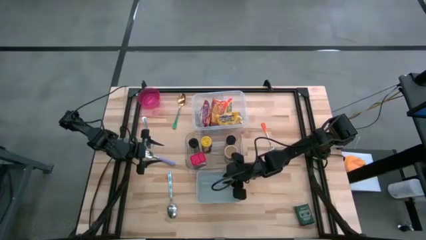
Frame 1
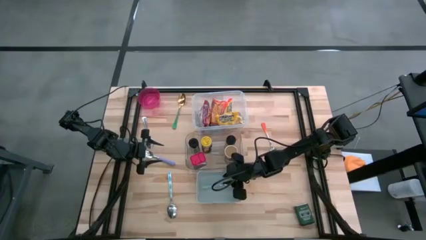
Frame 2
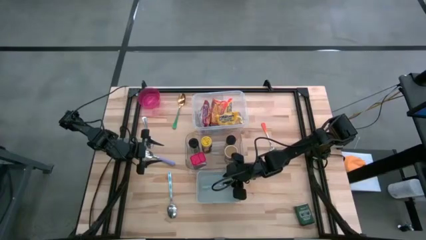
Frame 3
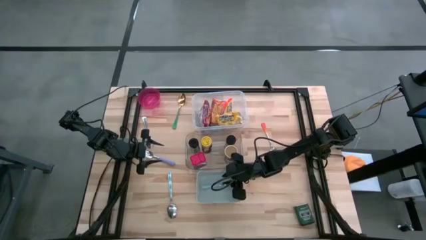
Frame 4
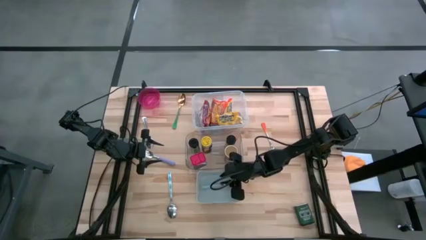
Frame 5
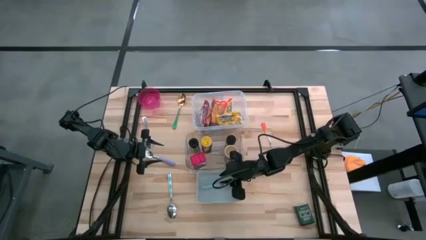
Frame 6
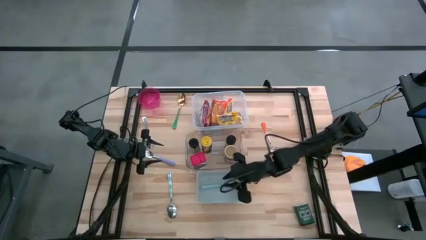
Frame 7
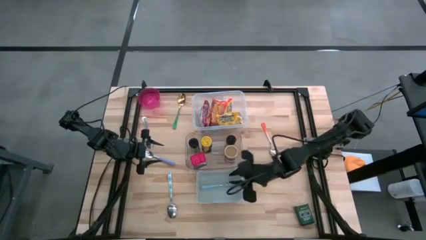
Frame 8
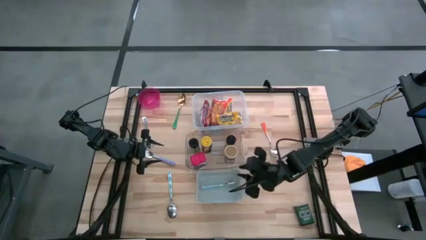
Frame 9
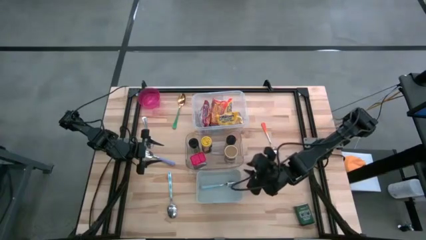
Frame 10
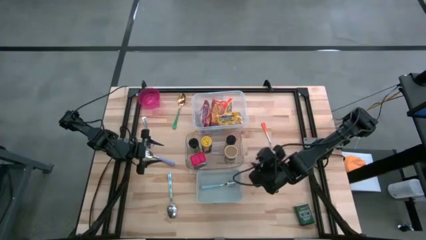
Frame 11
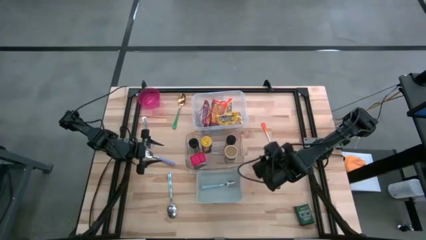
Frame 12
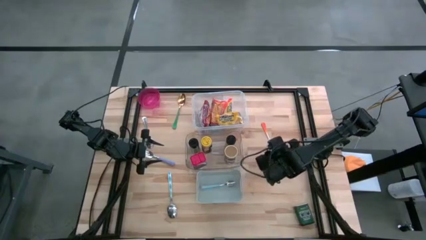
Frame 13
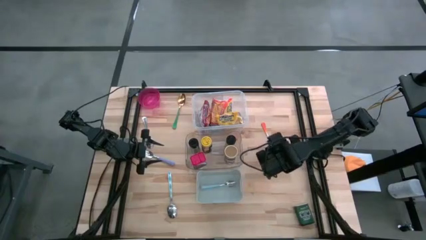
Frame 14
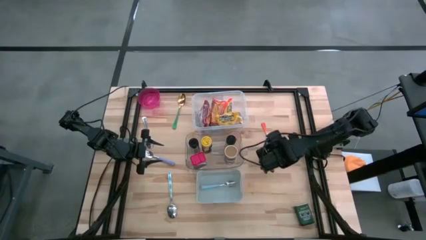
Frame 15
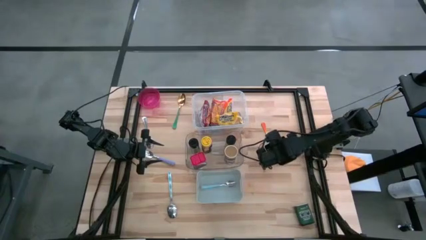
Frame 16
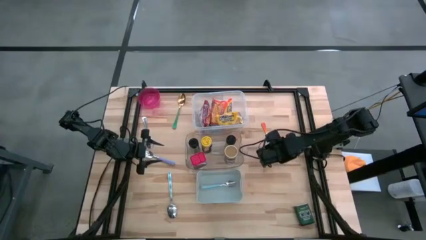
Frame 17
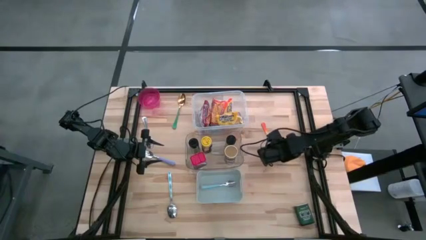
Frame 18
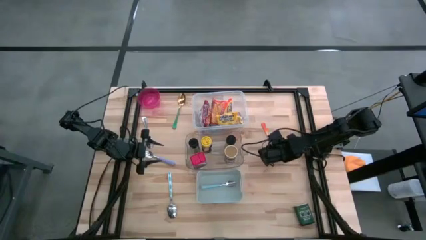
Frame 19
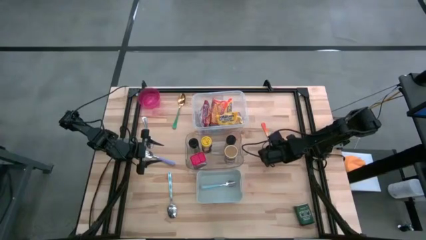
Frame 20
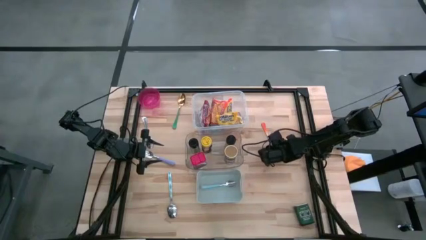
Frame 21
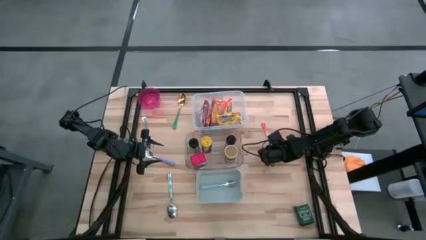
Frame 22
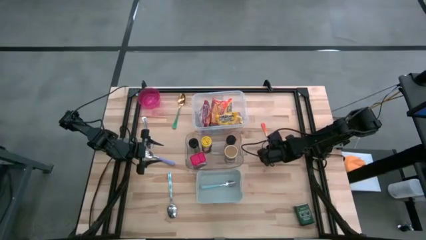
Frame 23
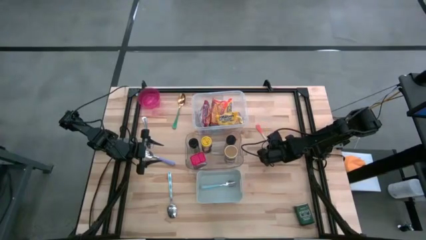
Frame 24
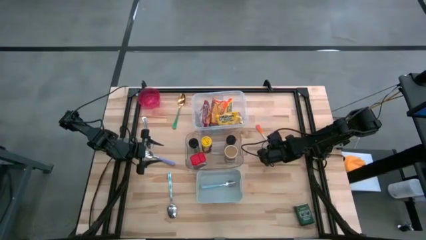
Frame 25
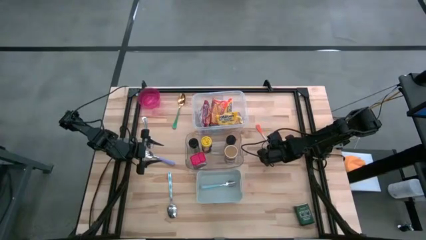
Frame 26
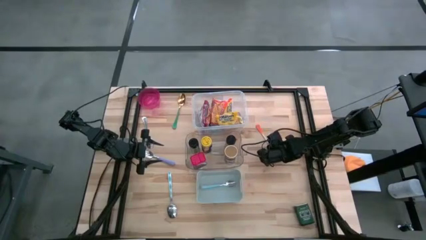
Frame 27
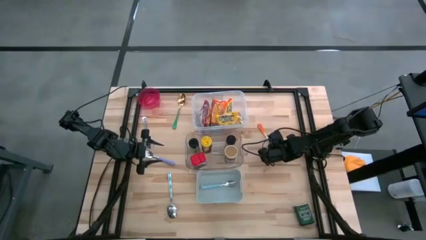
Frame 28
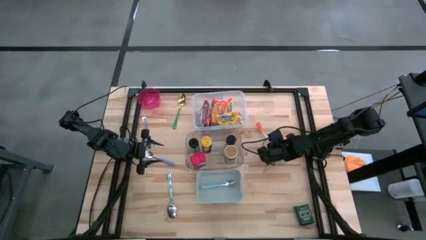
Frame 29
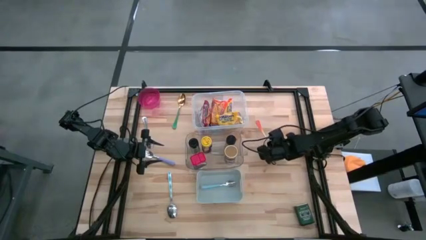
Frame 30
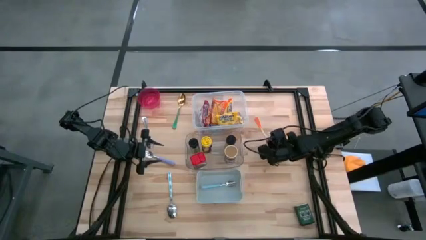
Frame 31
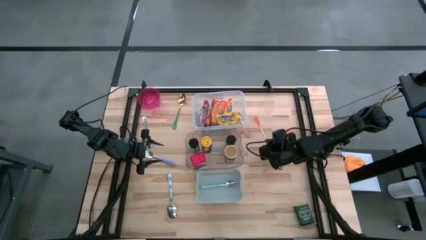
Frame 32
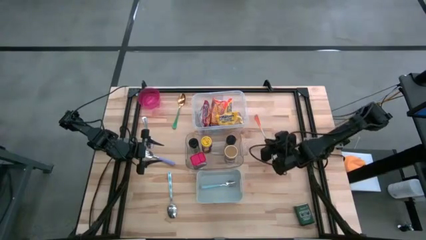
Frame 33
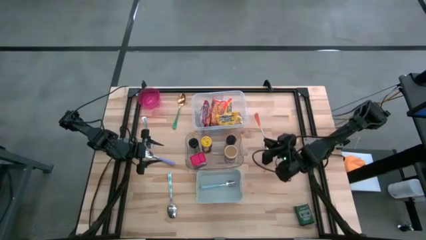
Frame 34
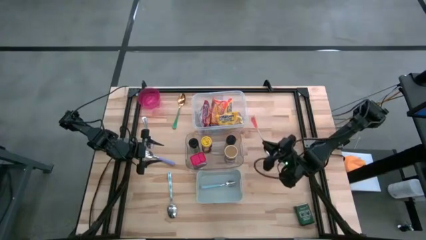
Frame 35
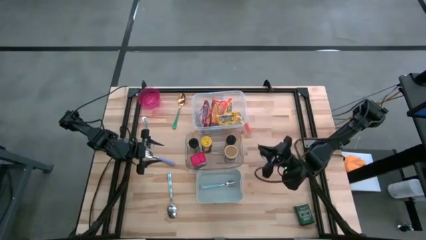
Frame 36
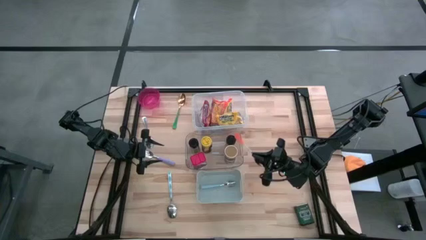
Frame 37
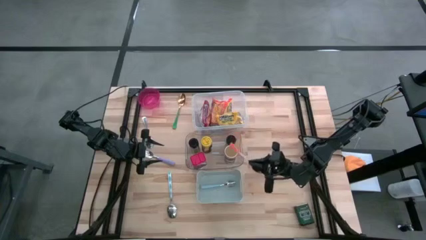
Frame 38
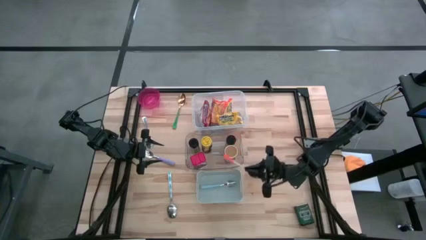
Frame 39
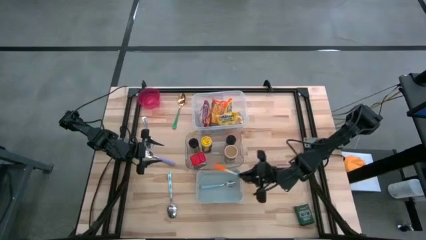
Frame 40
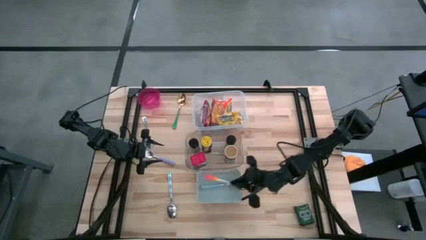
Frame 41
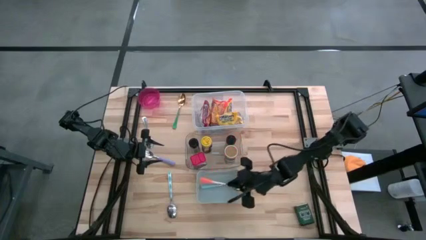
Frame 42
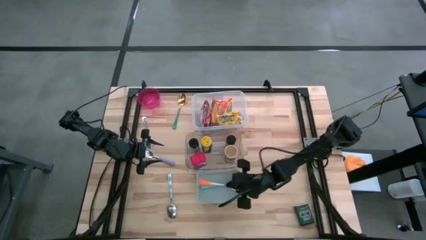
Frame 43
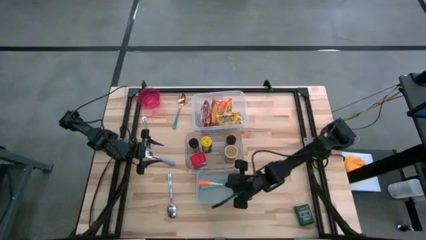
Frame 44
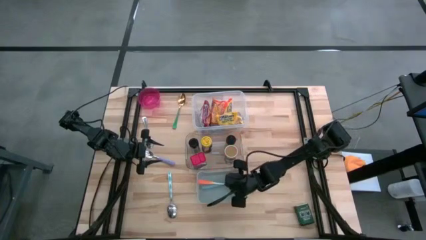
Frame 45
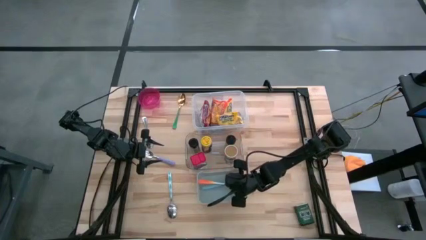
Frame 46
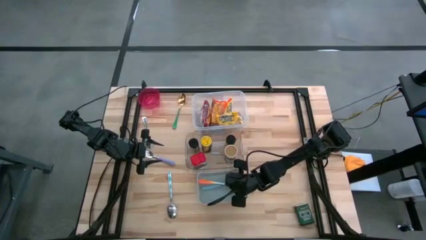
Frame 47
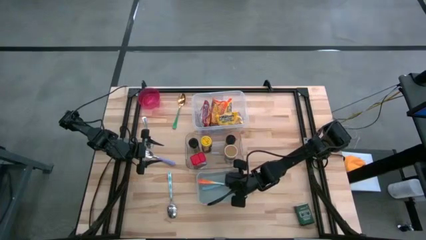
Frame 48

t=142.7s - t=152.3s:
Put the orange spoon into the gray bin
